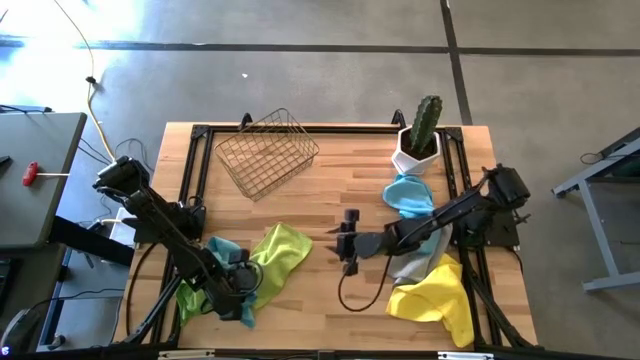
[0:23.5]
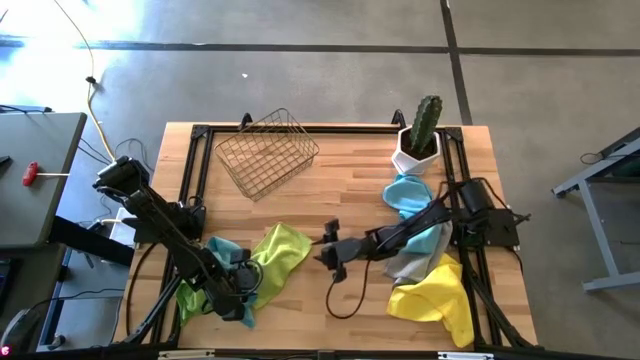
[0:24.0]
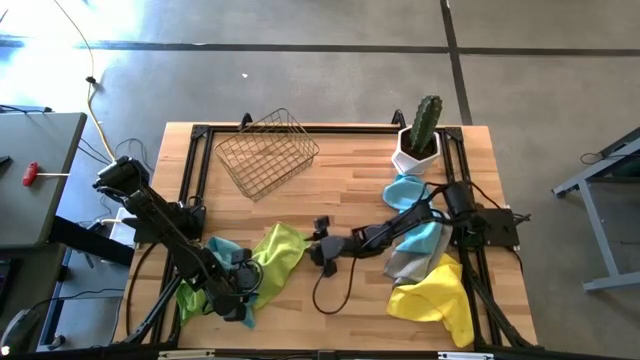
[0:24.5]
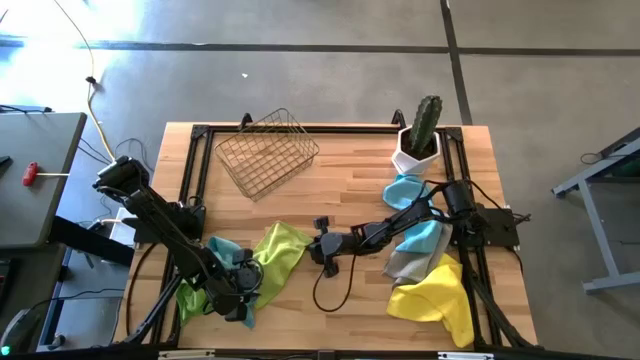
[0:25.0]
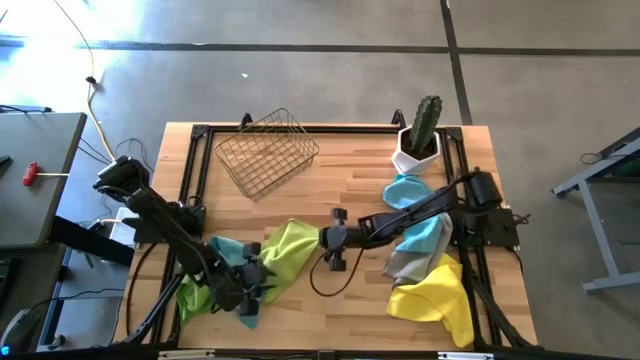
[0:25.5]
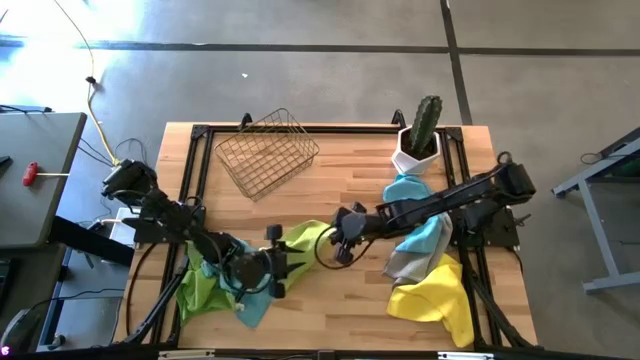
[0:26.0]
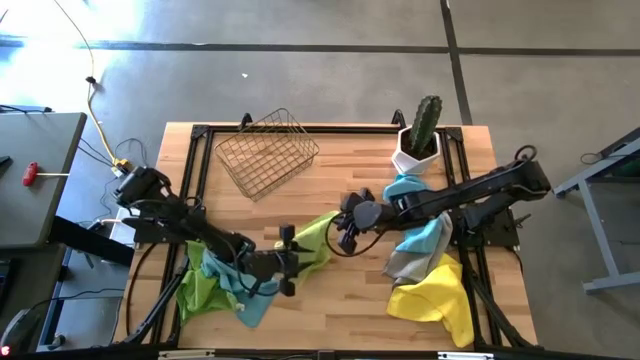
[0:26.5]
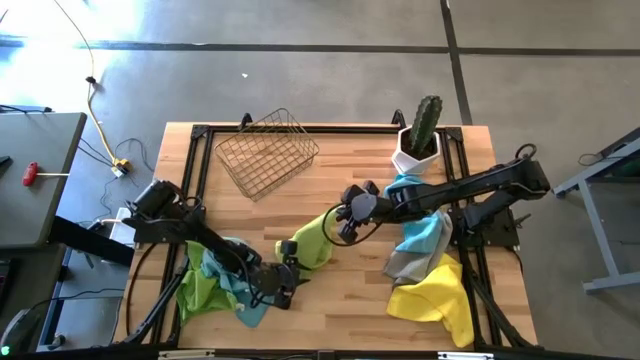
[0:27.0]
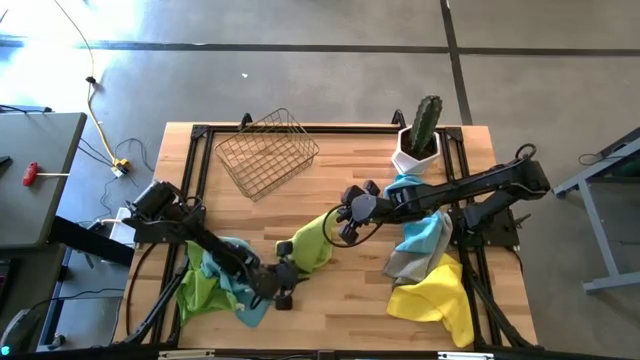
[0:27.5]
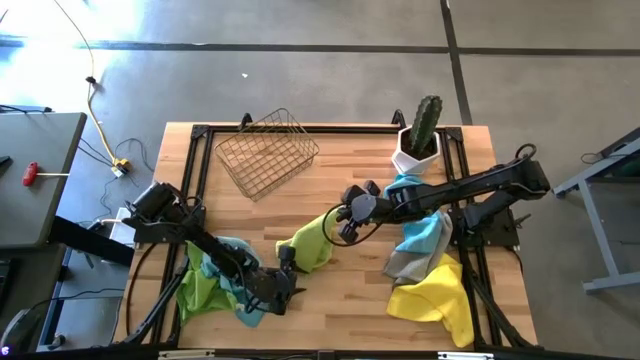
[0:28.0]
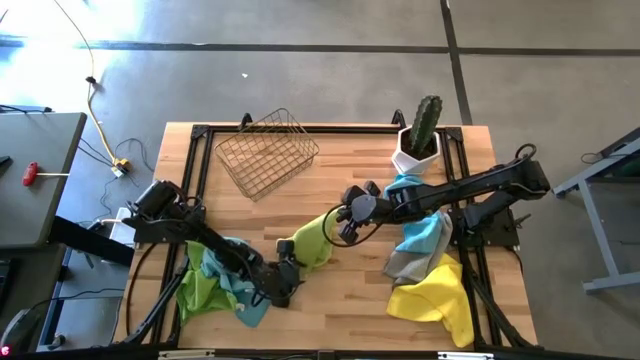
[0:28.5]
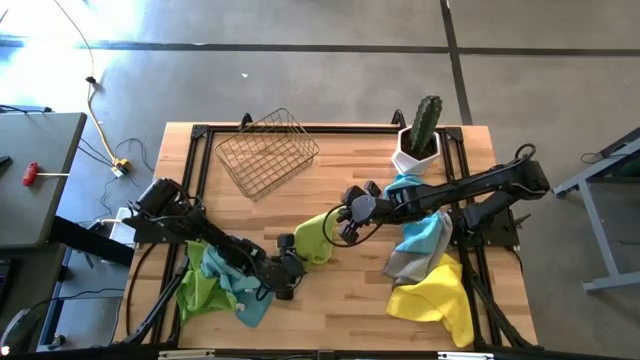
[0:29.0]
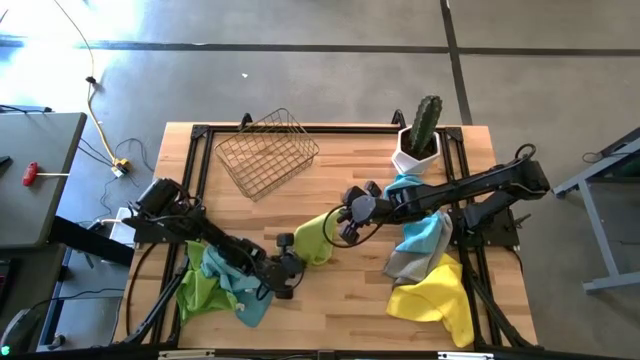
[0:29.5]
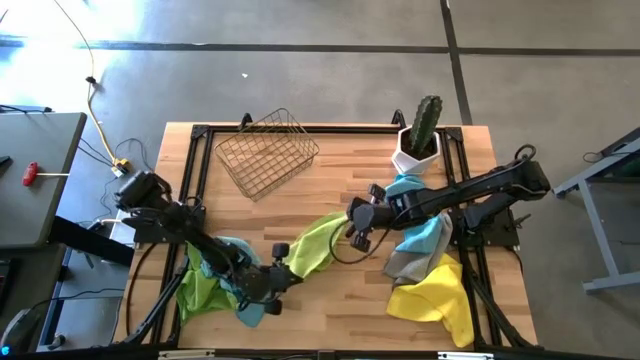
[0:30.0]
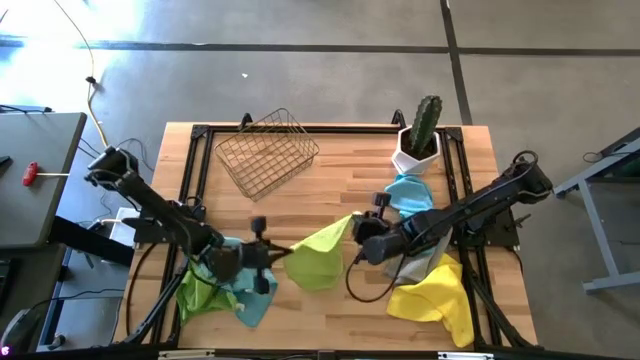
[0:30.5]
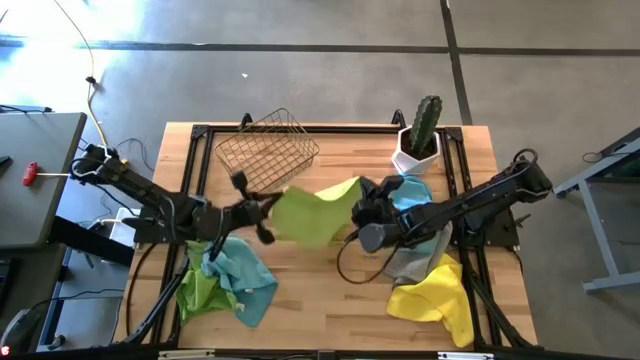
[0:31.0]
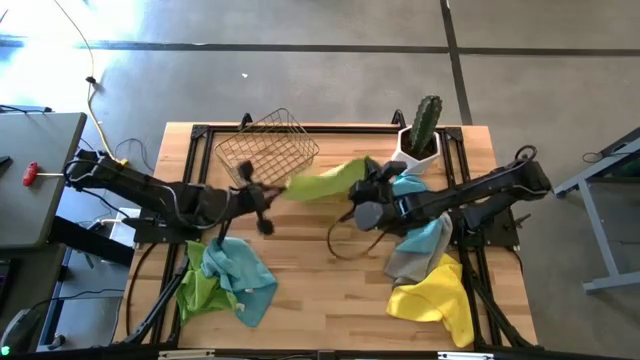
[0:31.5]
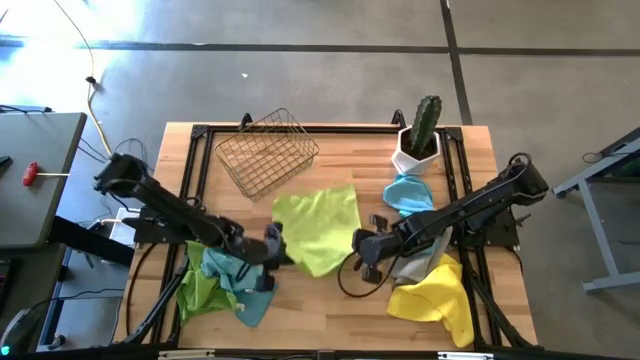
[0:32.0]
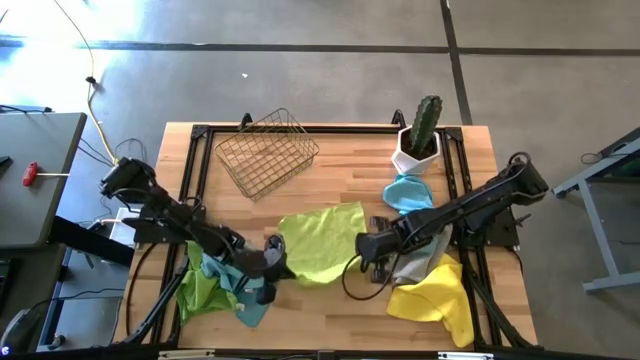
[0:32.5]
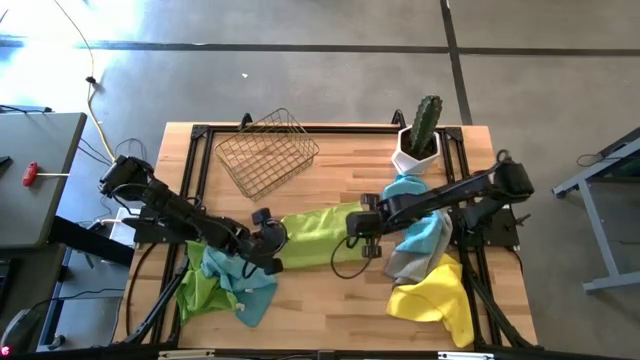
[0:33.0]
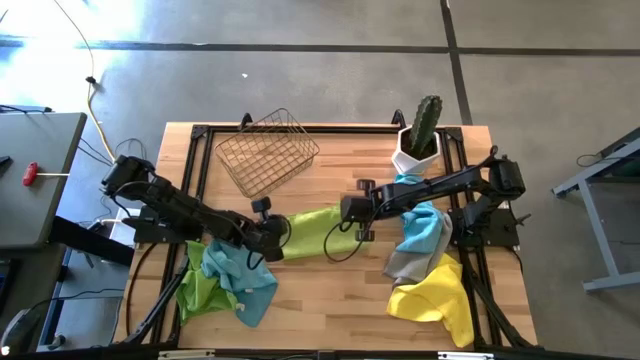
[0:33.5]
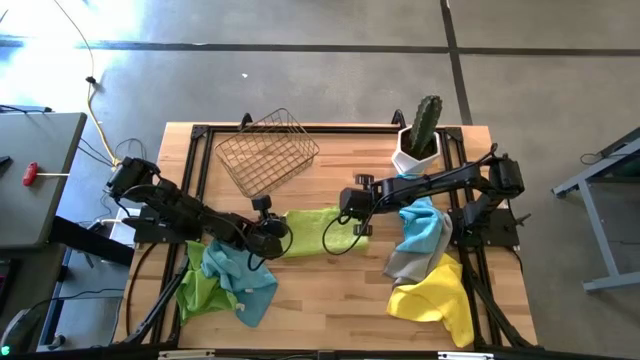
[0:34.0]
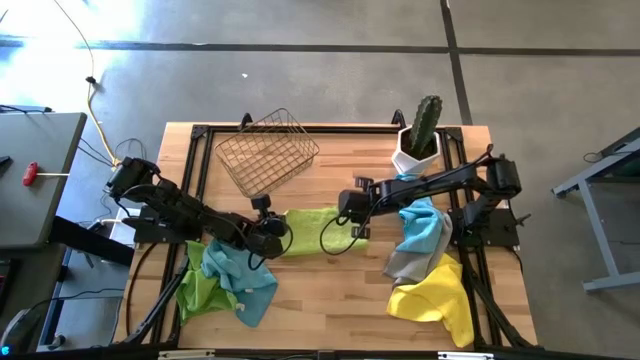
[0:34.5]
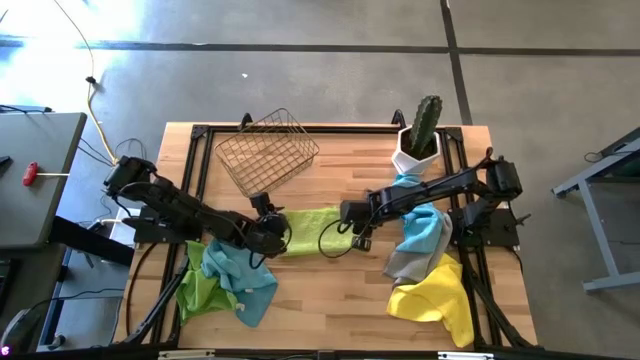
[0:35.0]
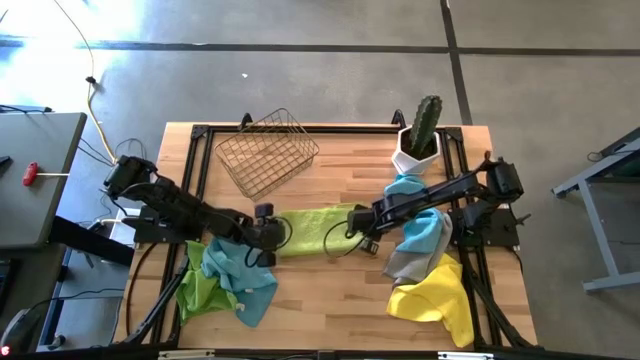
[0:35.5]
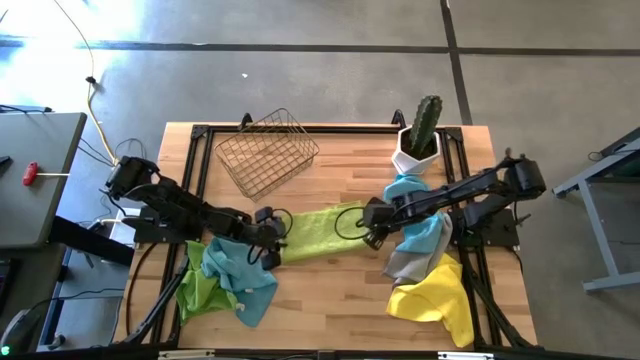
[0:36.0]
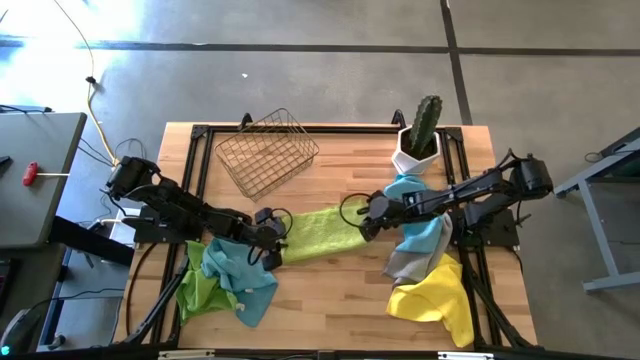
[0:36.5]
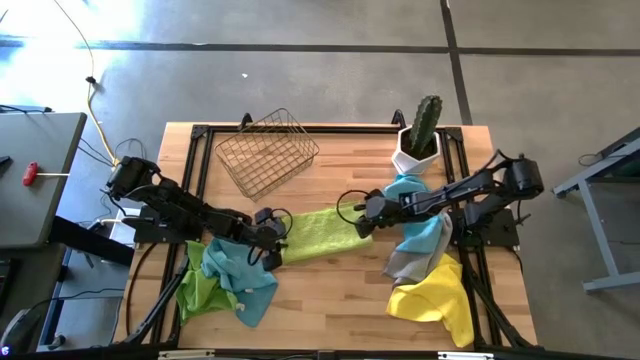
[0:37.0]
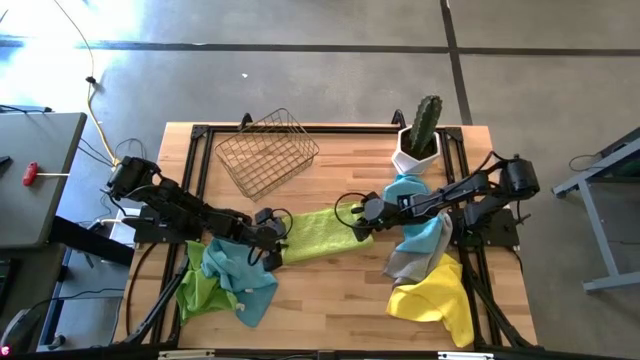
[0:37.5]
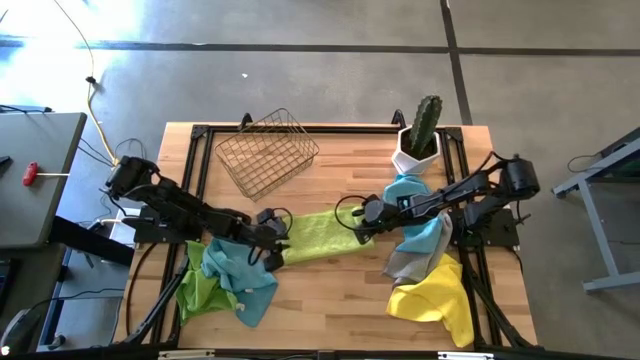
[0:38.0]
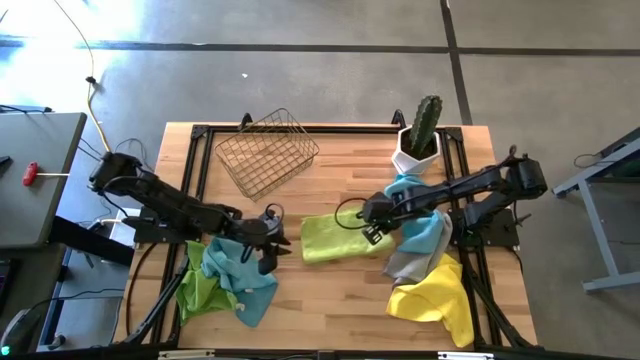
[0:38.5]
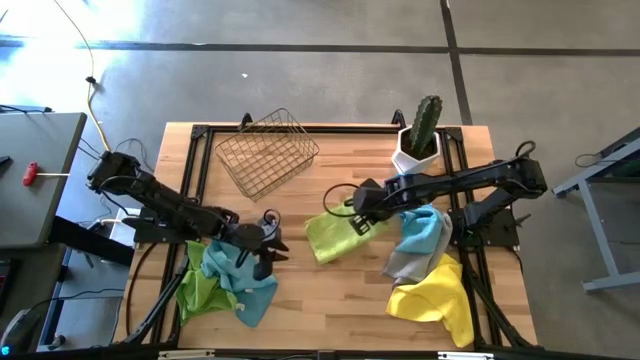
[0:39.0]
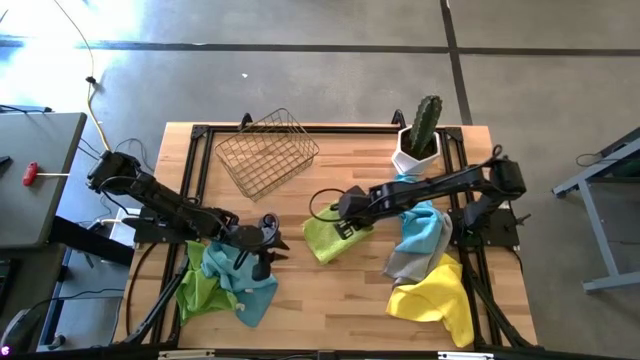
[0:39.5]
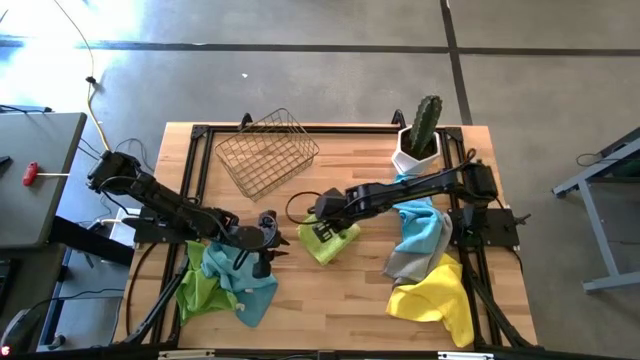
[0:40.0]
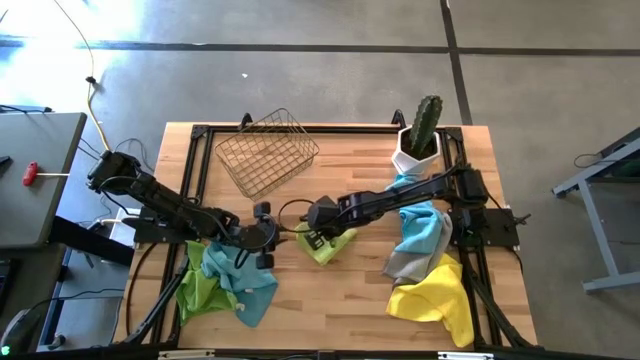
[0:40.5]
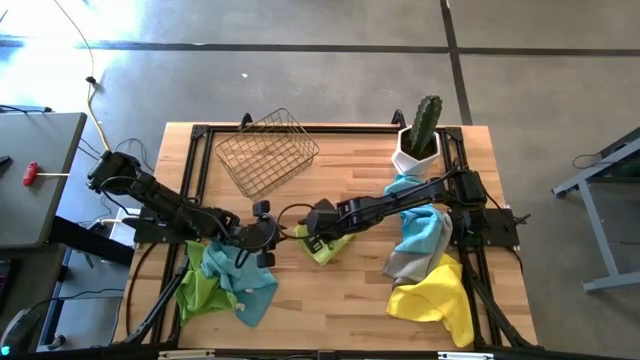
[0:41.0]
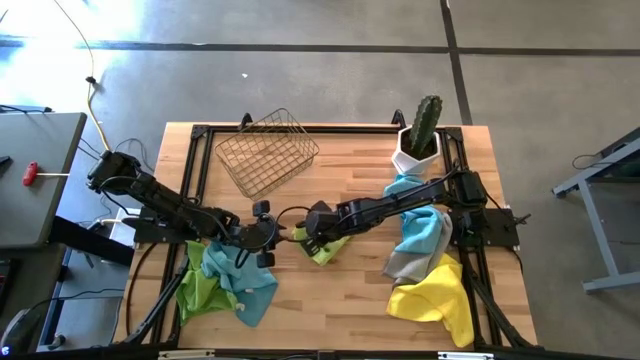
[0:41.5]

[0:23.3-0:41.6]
Task: Fold microfiber towels
Fold the light green microfiber towel
